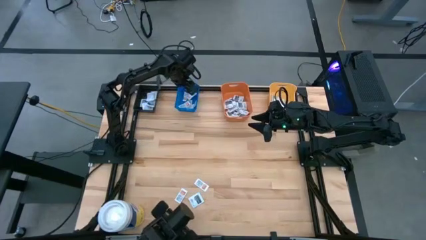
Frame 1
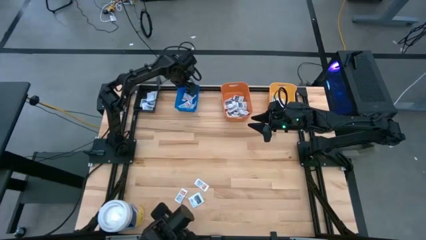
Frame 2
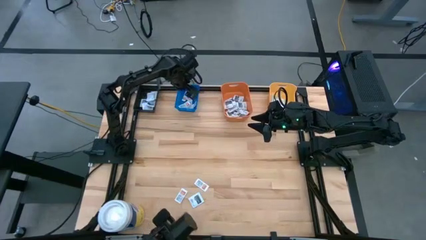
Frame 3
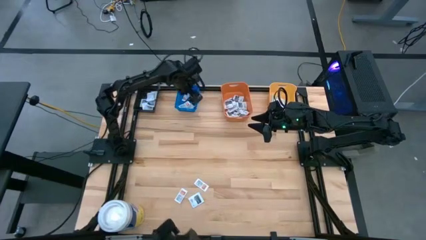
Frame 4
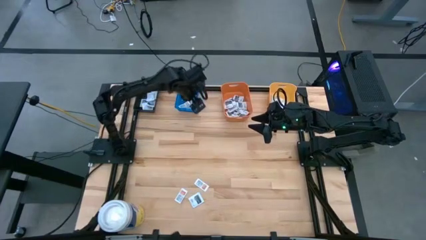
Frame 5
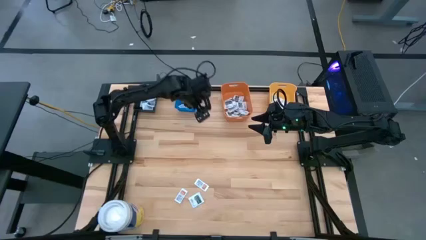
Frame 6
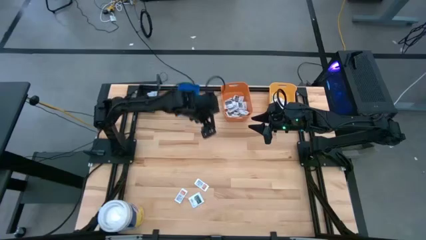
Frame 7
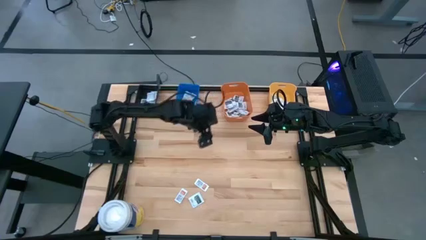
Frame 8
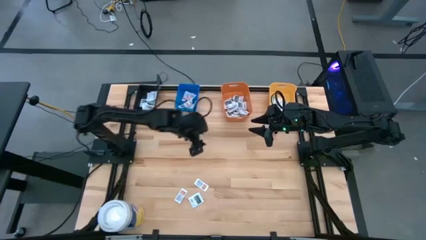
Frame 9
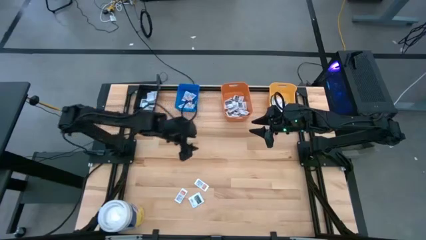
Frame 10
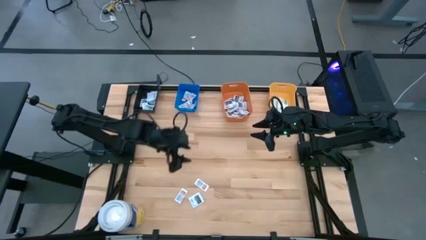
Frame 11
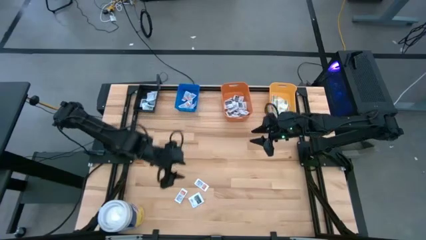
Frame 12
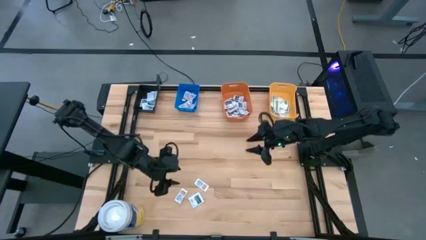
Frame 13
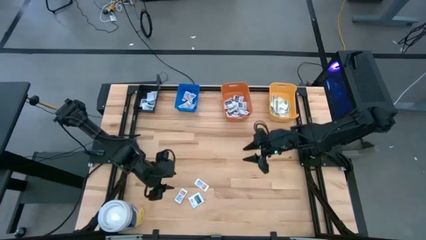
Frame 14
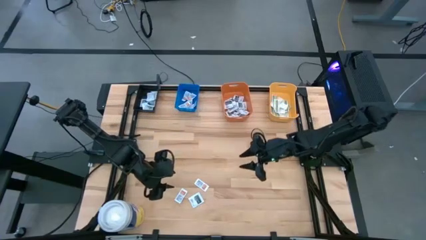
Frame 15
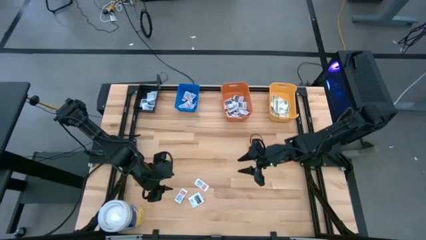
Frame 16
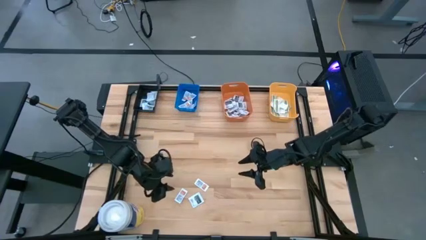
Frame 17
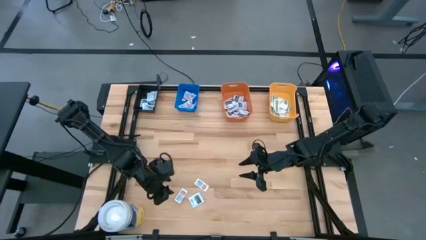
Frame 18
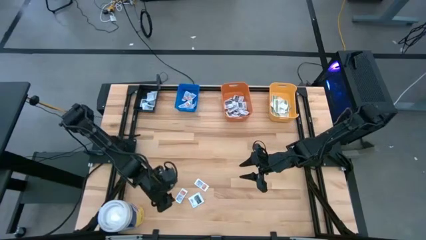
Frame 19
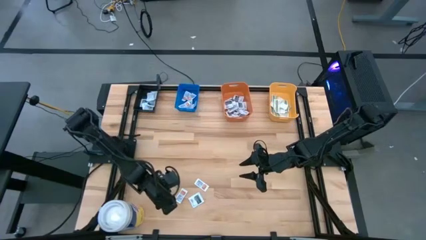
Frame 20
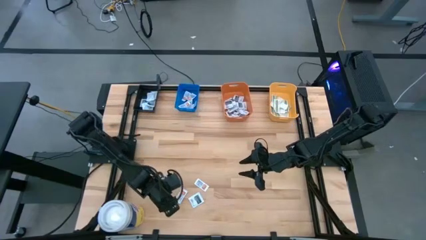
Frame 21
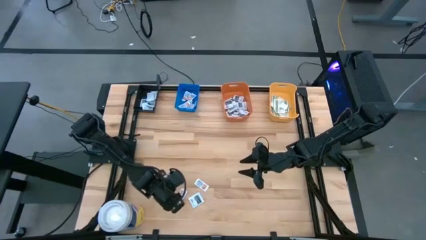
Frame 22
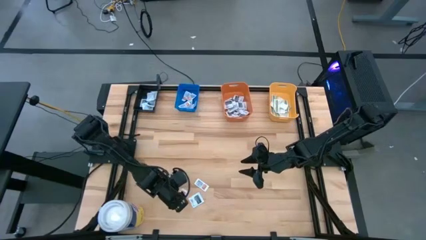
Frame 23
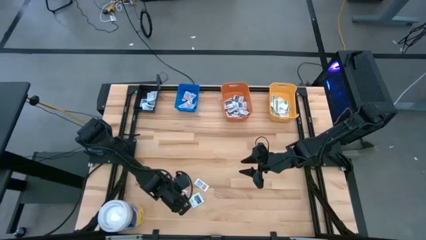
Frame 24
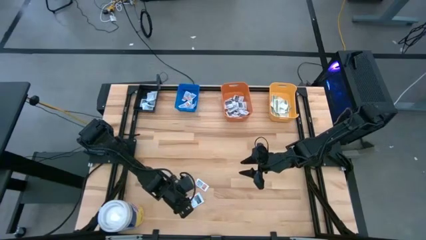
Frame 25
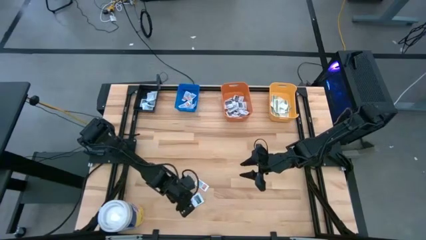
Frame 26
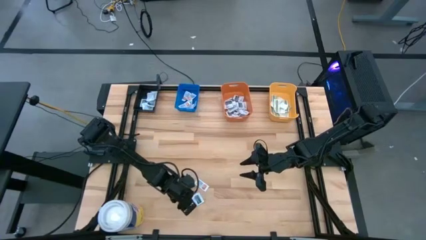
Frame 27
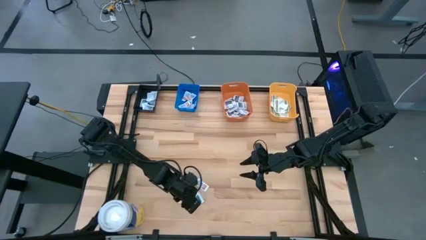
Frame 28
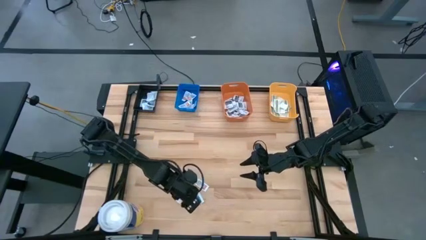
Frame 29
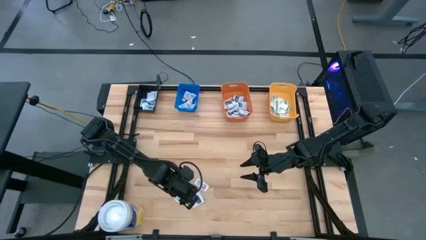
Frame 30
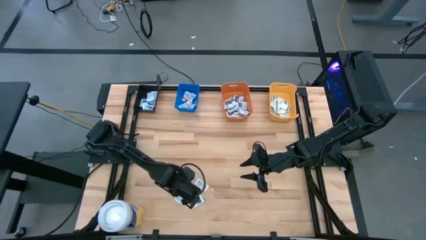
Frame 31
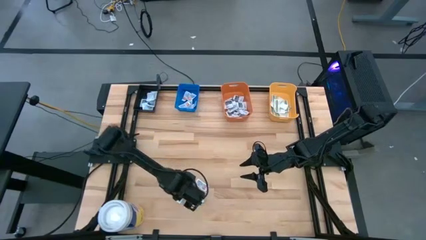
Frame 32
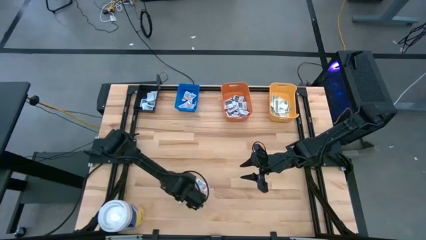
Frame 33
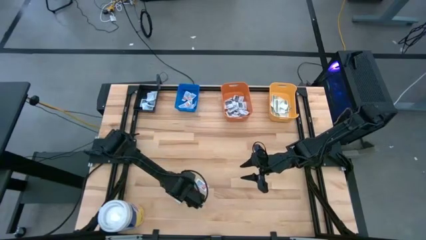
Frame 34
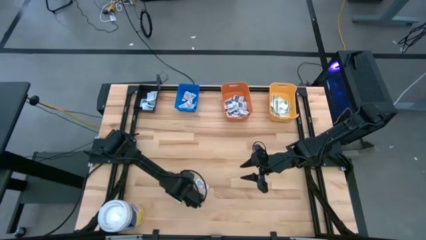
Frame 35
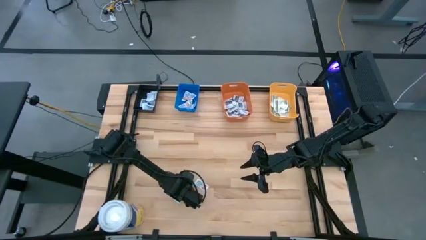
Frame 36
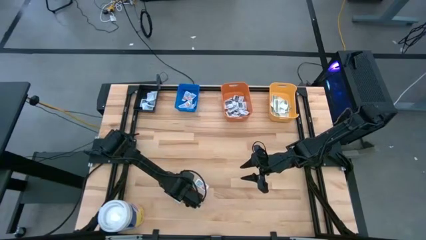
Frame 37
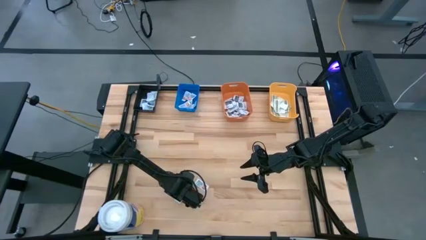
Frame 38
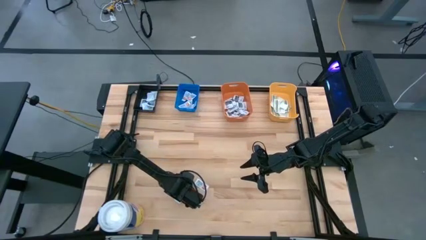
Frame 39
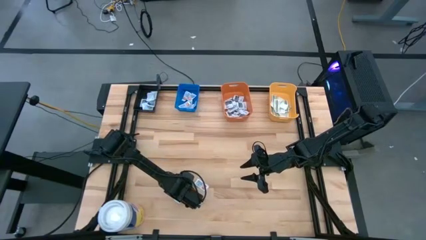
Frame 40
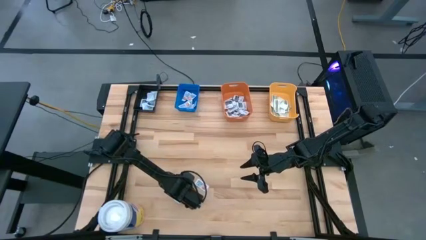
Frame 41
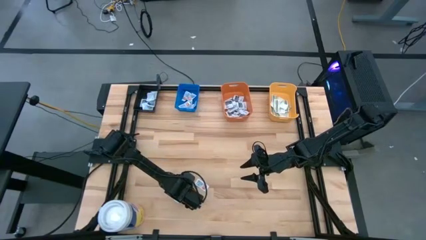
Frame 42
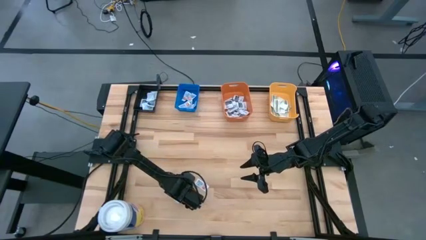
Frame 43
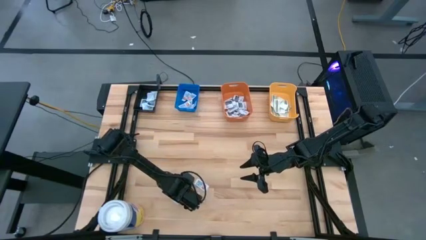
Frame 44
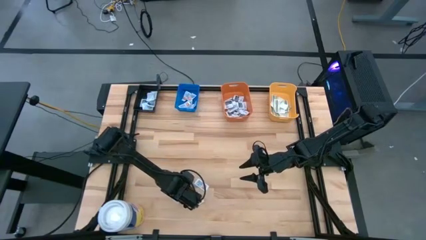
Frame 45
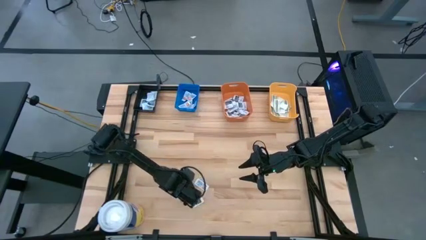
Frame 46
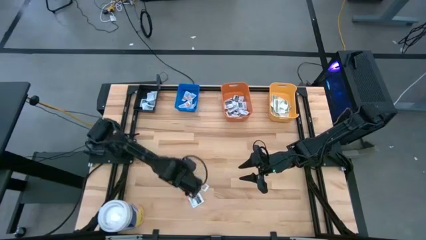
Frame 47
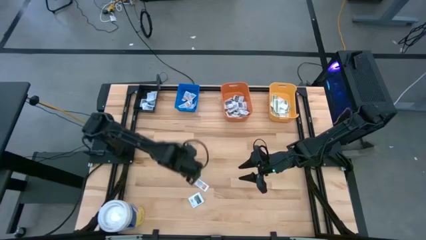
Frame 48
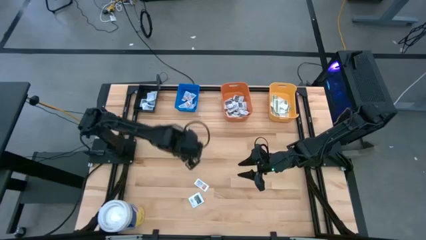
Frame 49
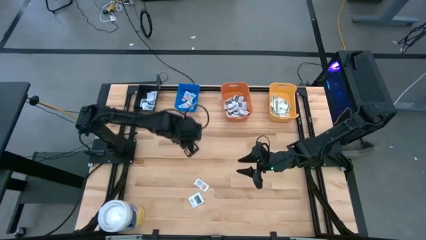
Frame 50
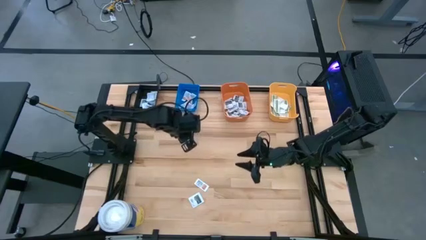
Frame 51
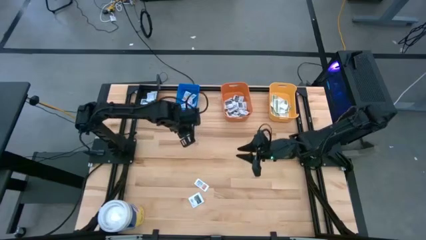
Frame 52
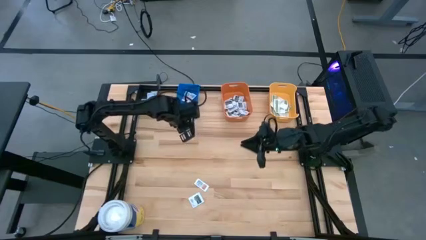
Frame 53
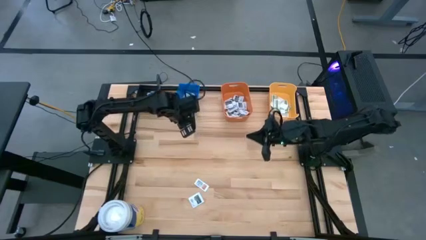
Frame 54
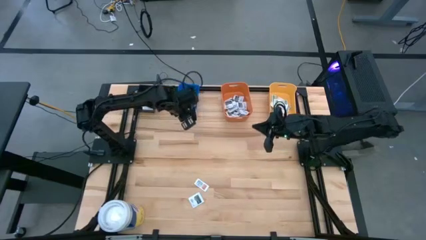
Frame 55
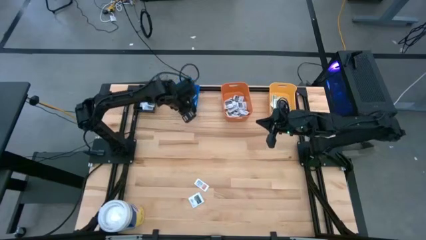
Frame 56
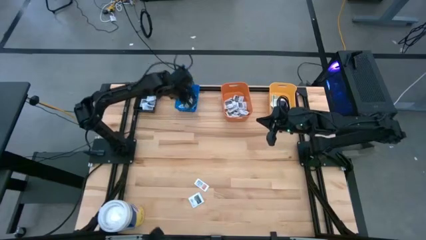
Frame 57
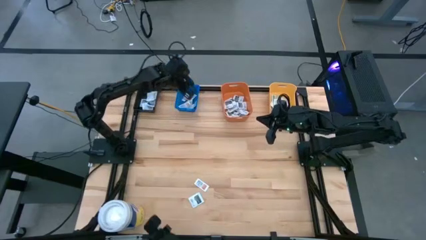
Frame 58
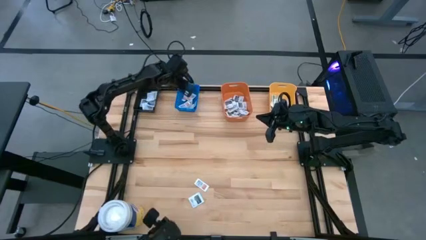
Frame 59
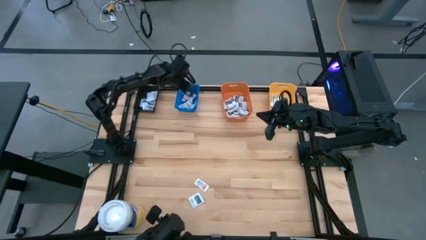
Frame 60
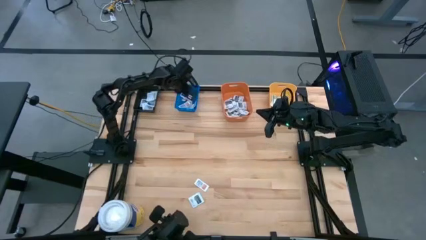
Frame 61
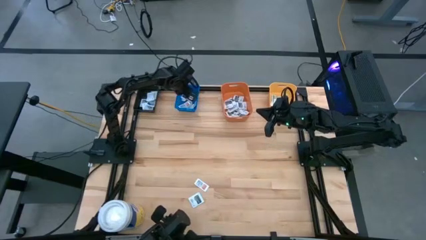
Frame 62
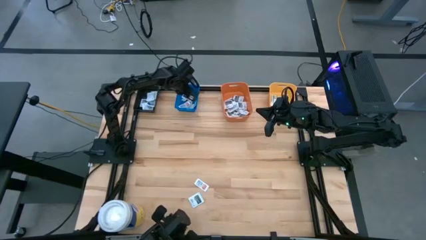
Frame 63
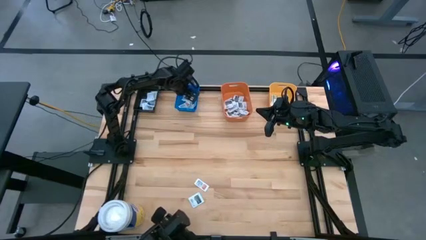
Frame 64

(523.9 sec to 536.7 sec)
Task: Pick & Place First Aid Supplies
Put the ointment pack into the blue bin

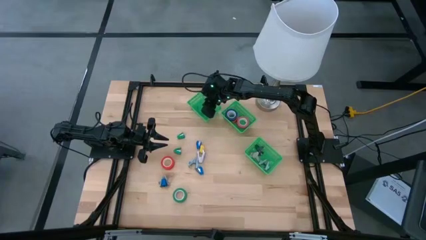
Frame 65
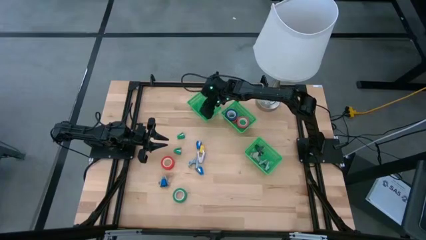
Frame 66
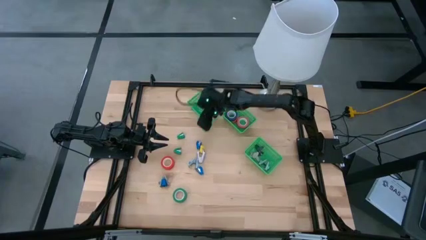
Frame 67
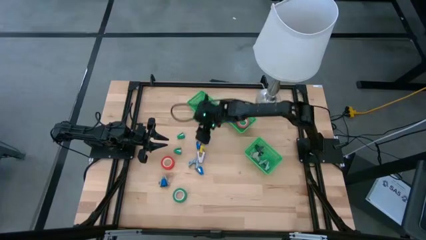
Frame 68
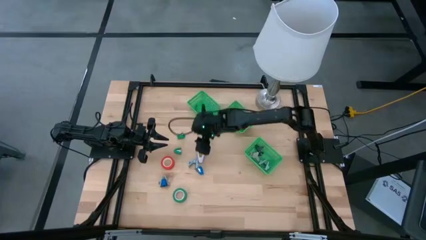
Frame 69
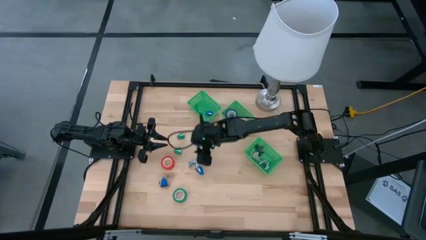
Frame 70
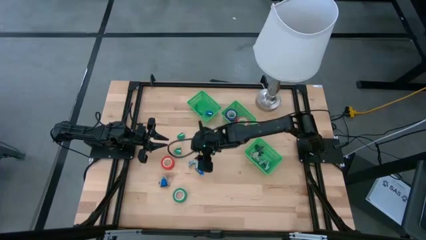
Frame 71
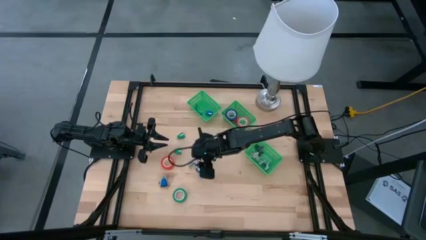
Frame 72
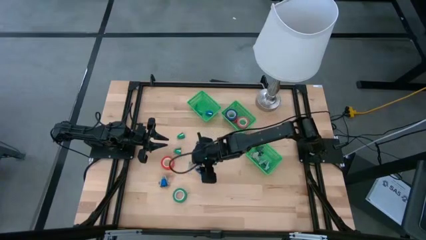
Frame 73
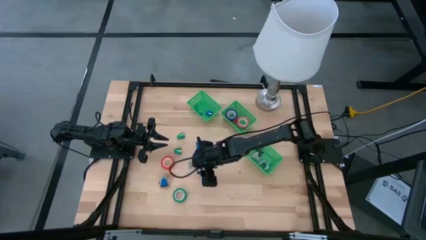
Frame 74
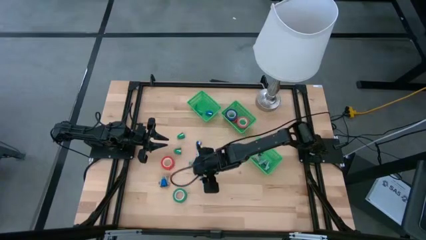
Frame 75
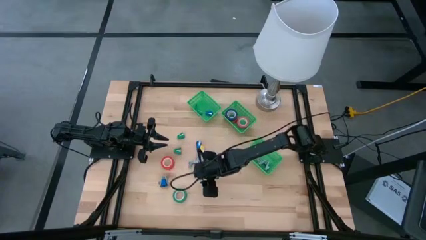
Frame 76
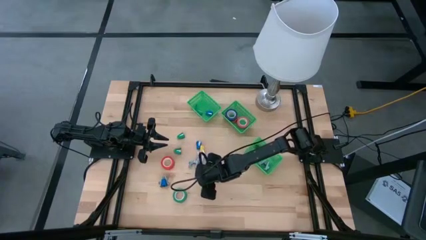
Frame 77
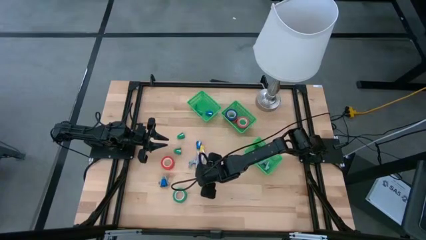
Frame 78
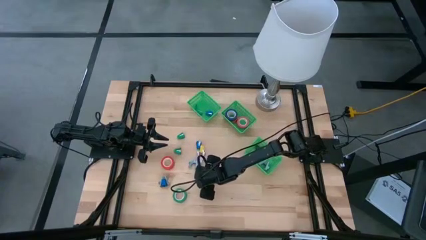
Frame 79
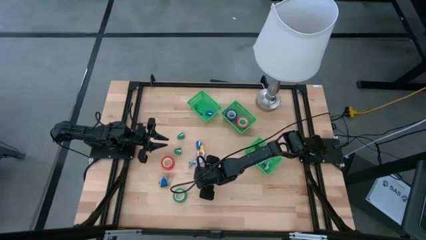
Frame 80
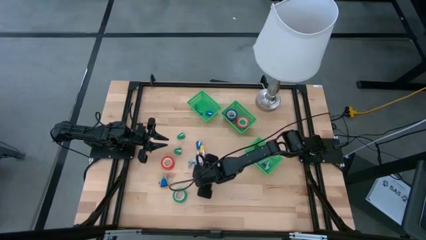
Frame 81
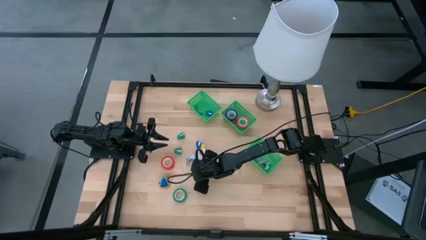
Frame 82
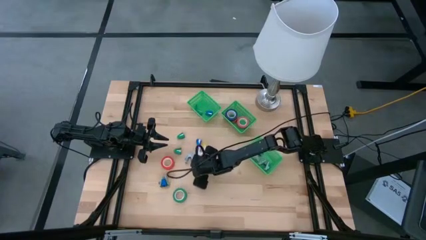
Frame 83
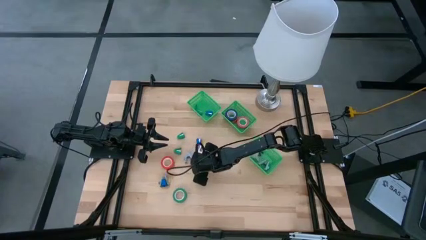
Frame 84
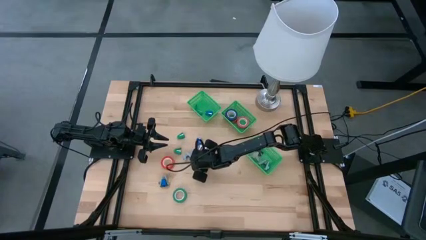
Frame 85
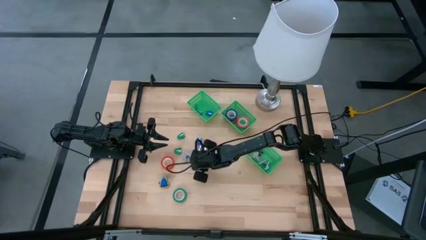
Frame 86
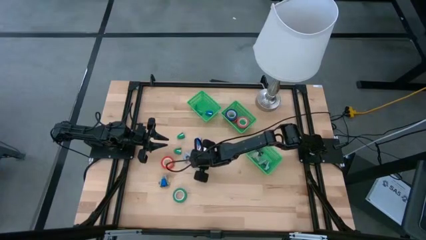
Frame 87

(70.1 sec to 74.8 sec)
Task: Pick and place Stapler, Stapler remover, tape
Put the middle blue stapler into the top basket
